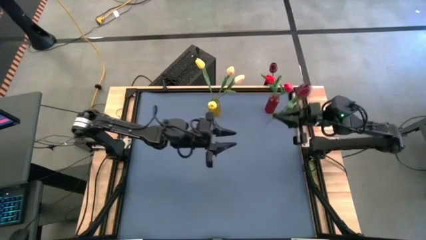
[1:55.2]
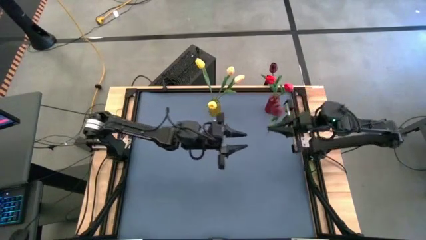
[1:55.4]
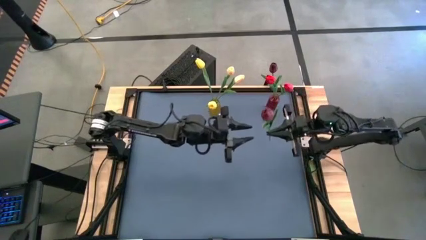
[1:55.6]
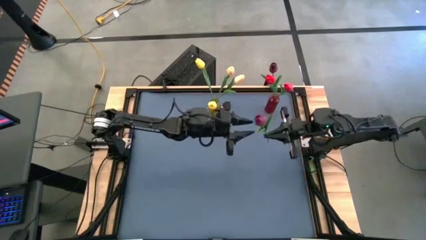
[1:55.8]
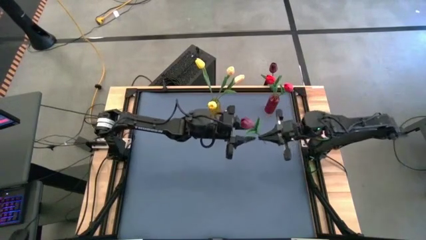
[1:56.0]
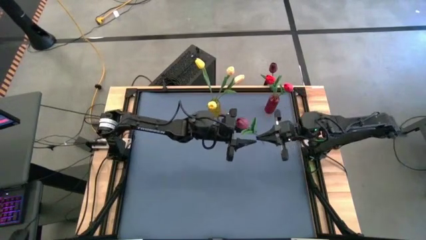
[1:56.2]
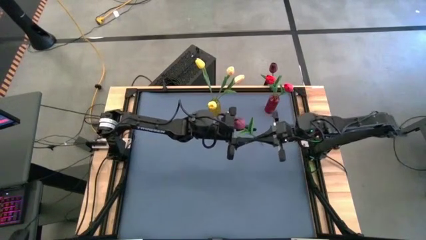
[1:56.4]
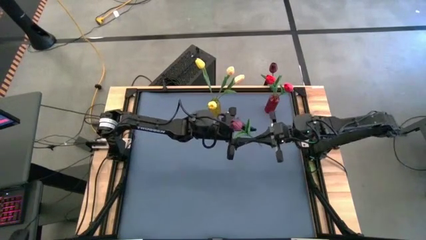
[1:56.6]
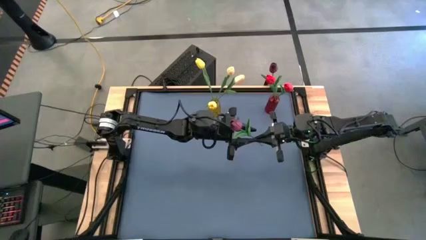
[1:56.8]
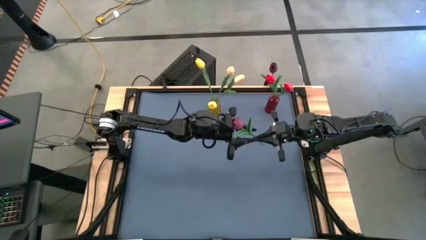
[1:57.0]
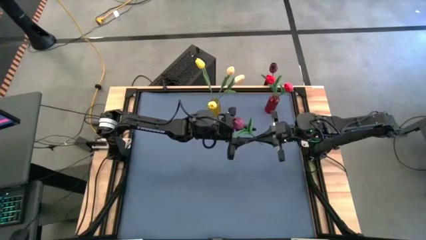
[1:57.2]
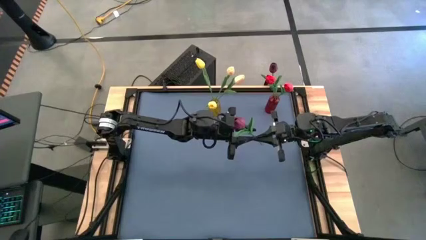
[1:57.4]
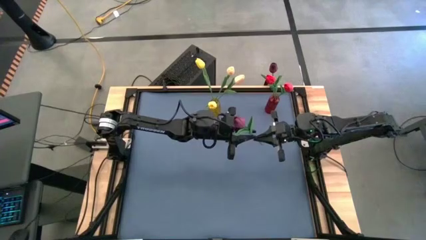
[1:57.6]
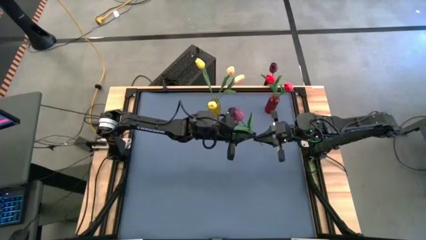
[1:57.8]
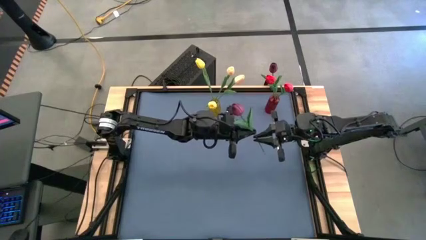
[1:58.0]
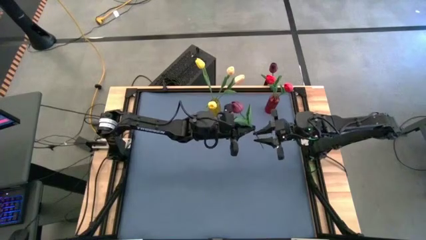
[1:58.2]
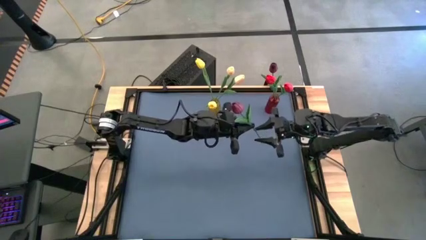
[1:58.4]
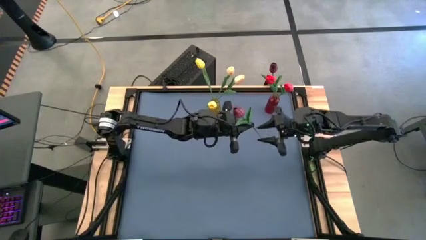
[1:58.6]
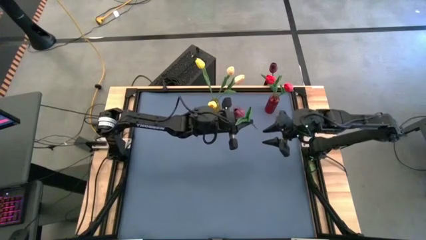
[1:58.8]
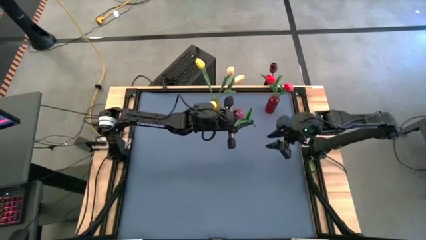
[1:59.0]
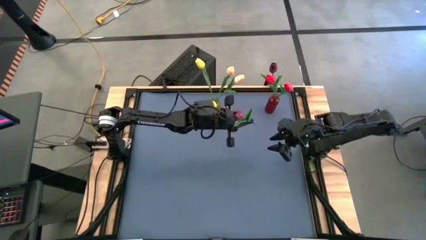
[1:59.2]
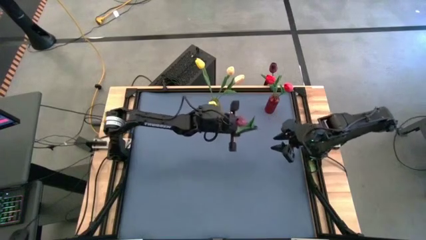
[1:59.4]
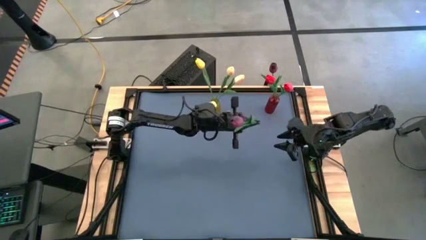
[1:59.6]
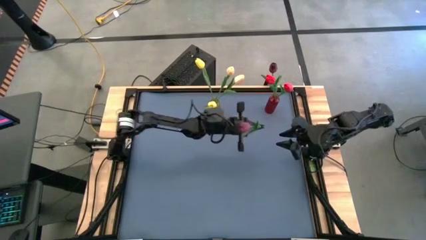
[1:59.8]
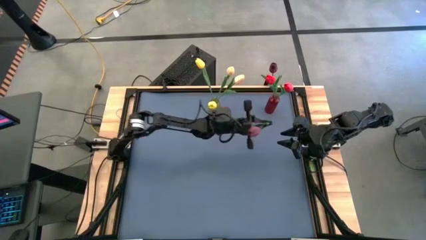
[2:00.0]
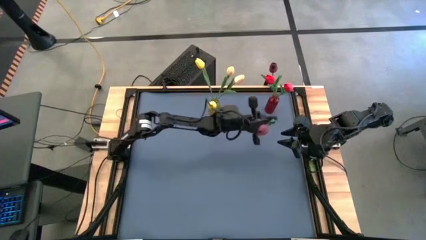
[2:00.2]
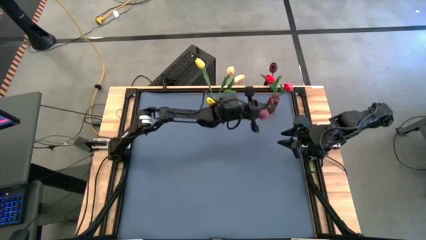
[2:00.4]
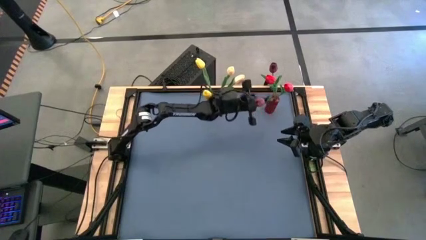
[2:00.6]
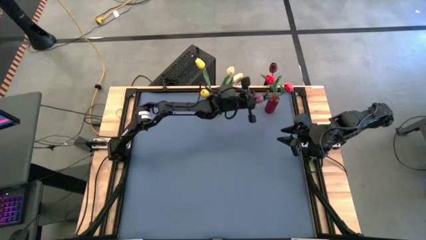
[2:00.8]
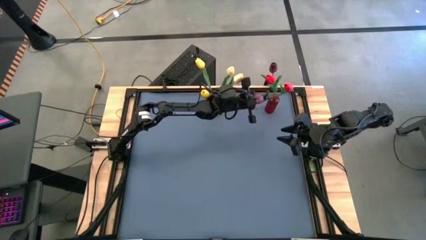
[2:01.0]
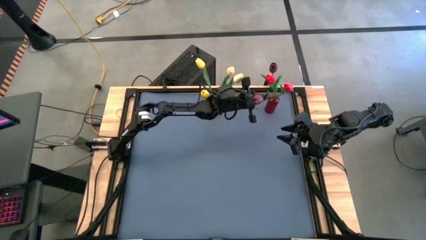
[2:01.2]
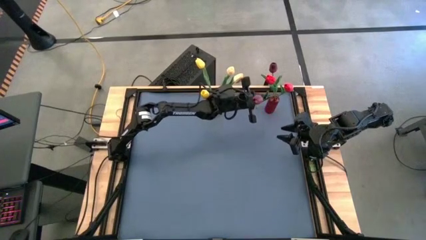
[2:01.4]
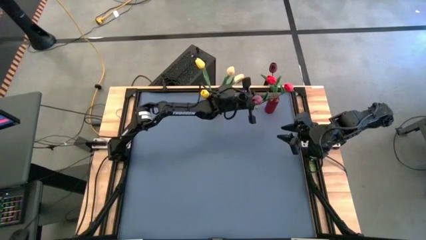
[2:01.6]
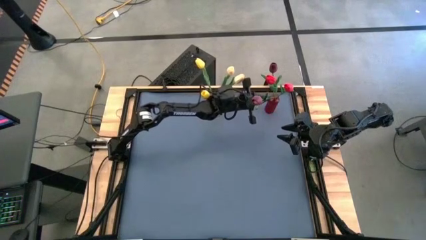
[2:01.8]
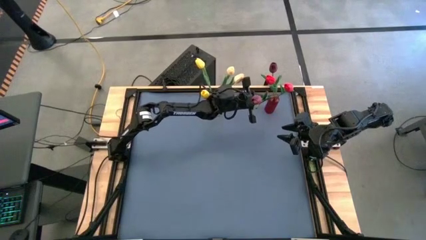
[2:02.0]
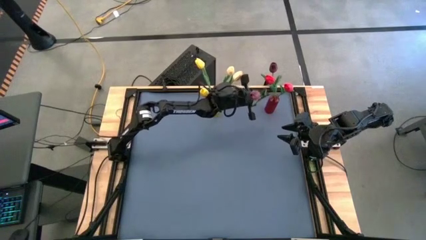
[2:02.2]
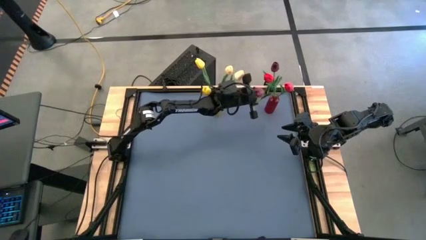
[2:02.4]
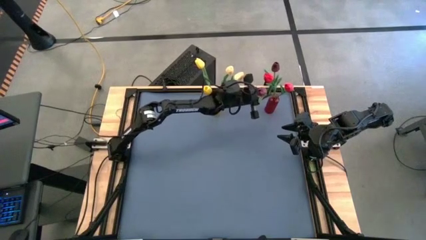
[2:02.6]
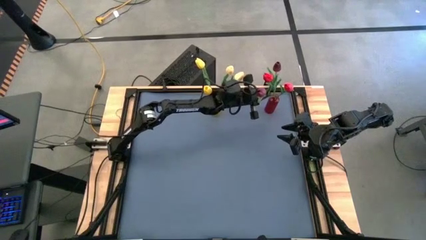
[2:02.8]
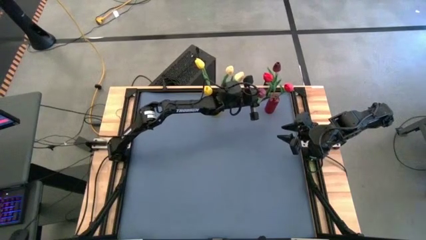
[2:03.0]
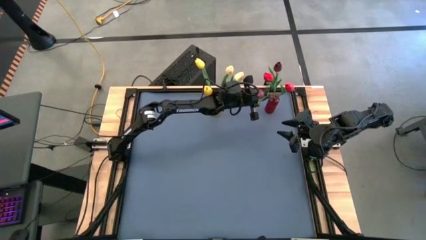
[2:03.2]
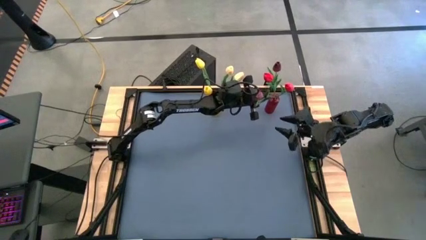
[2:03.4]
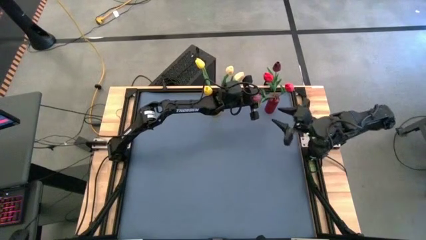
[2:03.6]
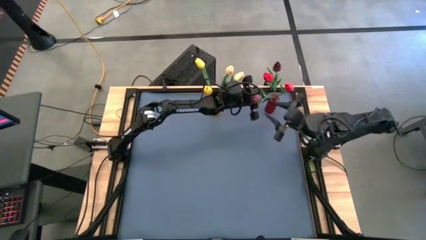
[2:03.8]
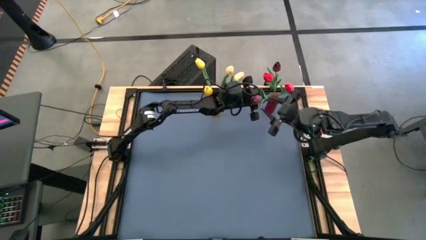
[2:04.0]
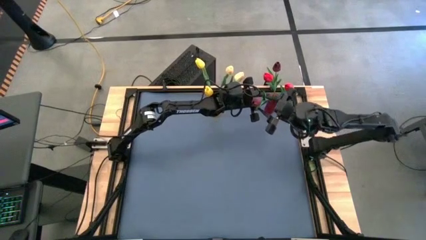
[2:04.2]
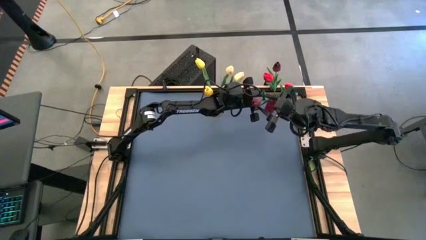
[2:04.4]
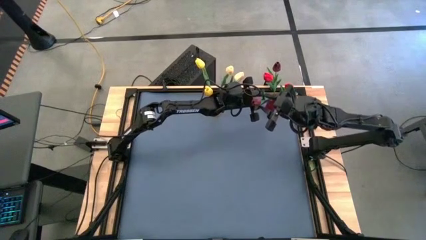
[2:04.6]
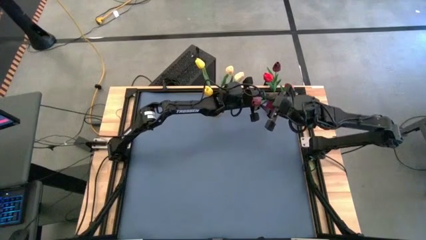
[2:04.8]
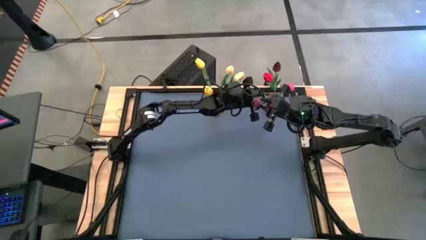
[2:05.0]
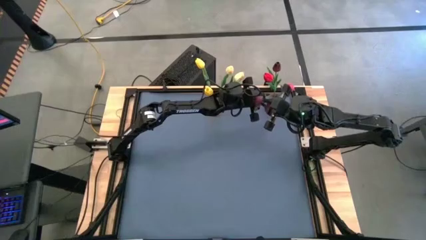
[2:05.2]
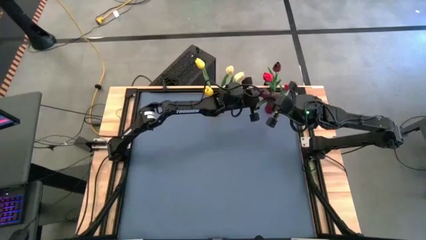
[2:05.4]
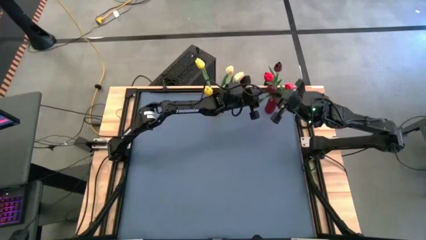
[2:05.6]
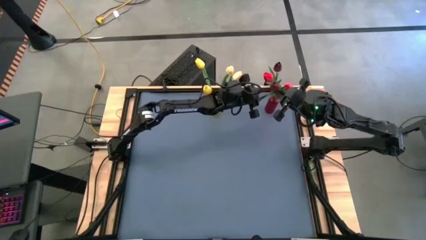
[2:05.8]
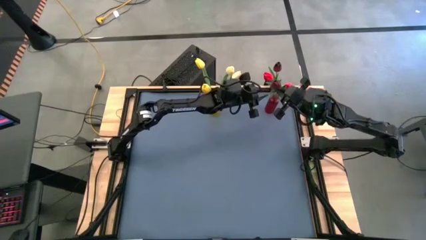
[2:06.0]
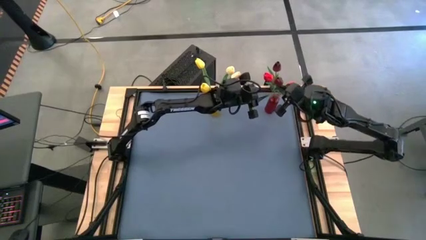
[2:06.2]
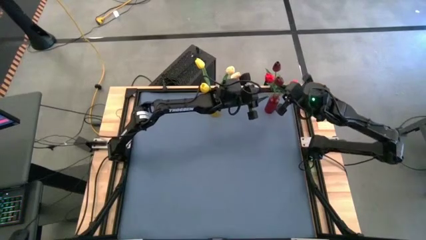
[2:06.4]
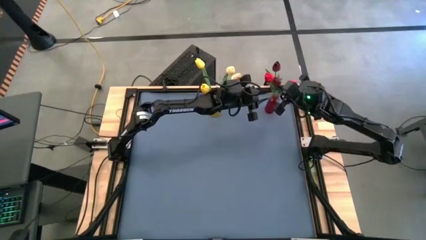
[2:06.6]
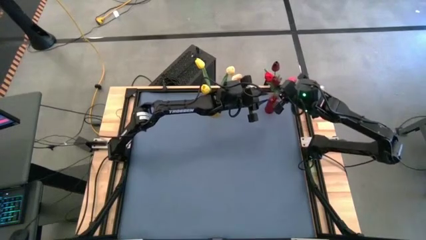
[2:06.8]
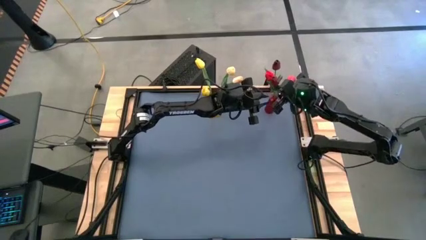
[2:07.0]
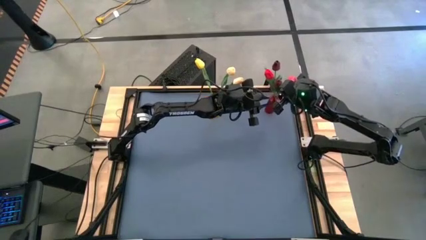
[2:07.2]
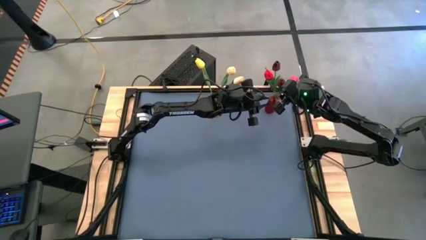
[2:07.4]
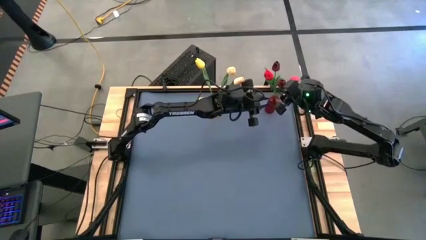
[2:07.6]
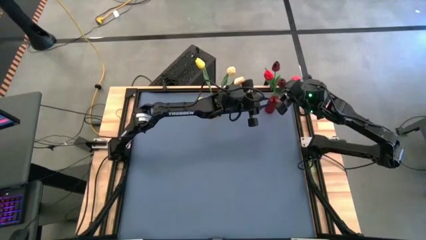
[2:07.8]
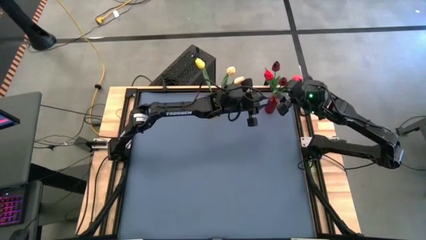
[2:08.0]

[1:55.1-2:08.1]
Task: Sort flowers into vase by color
Put the dark red flower into the red vase

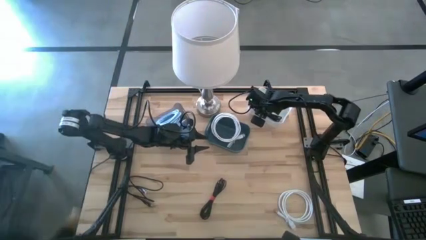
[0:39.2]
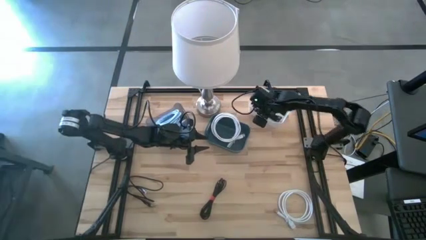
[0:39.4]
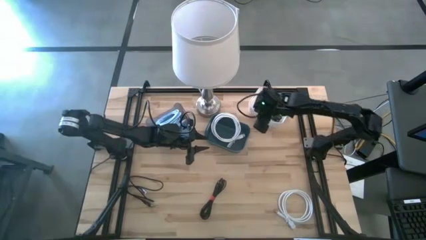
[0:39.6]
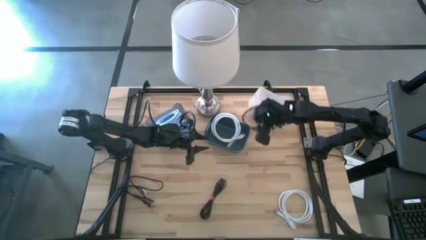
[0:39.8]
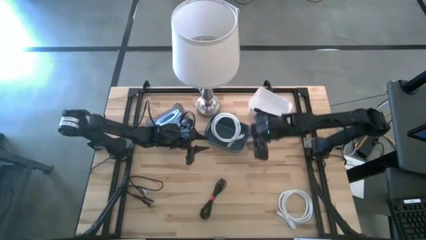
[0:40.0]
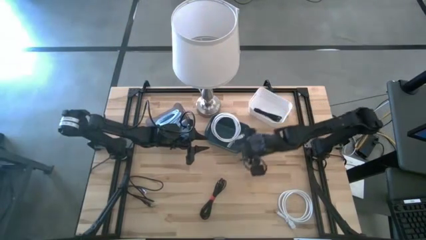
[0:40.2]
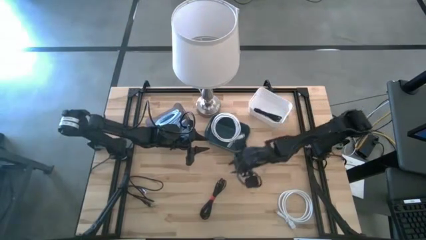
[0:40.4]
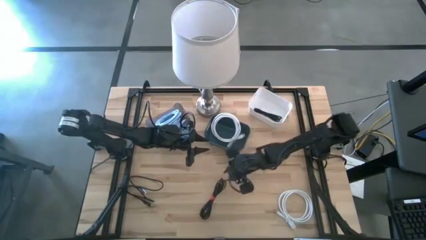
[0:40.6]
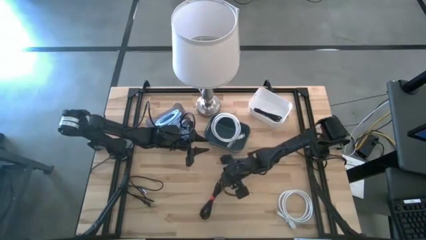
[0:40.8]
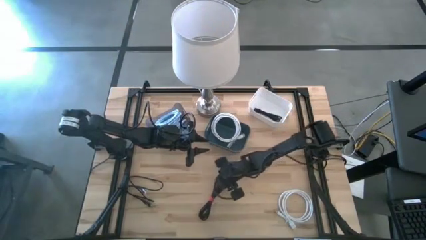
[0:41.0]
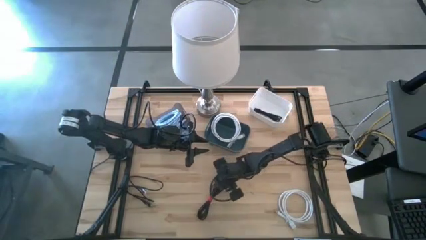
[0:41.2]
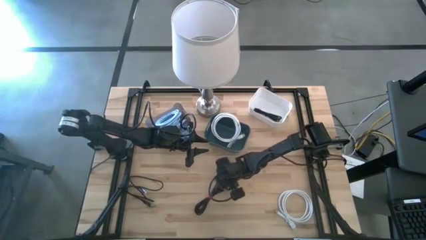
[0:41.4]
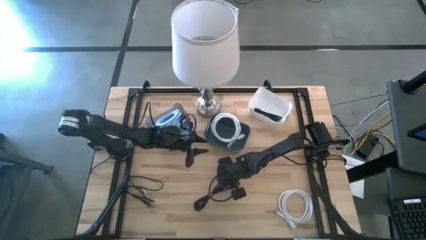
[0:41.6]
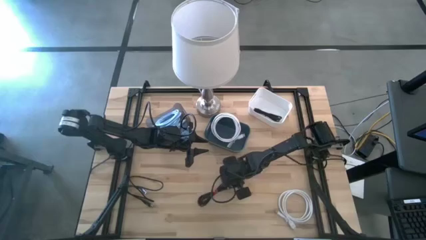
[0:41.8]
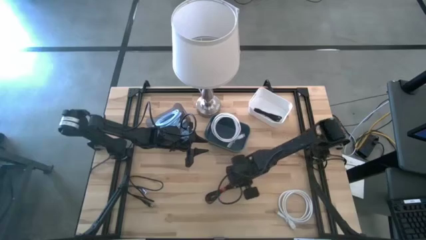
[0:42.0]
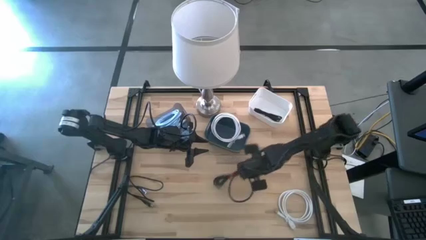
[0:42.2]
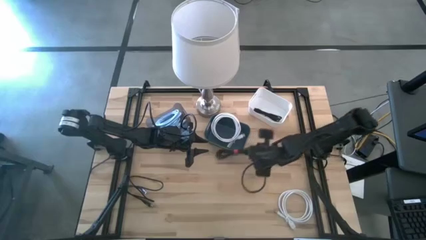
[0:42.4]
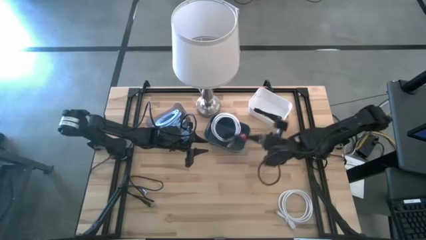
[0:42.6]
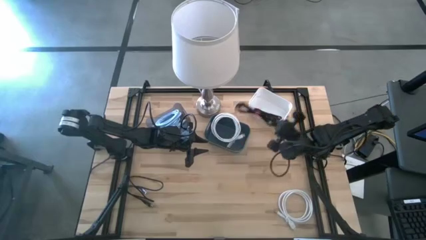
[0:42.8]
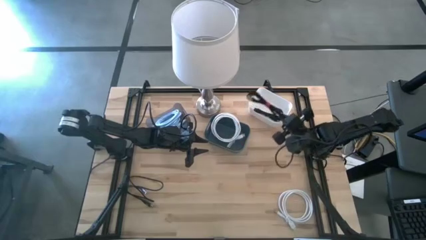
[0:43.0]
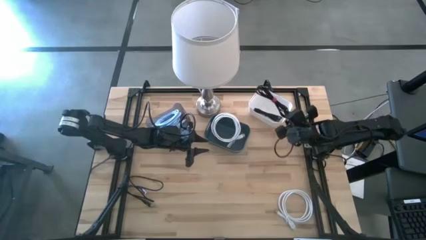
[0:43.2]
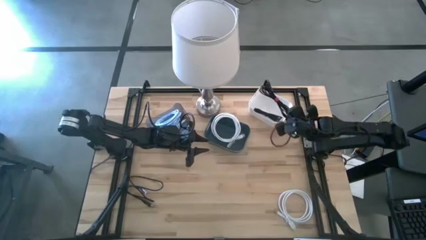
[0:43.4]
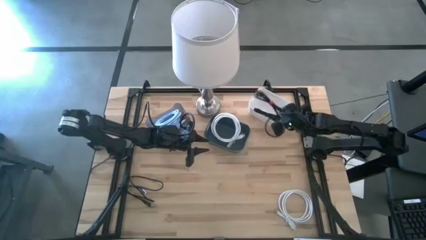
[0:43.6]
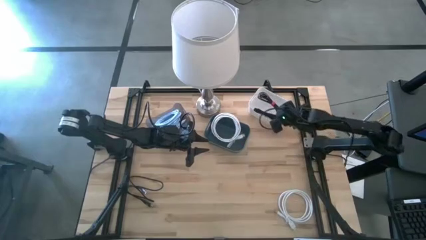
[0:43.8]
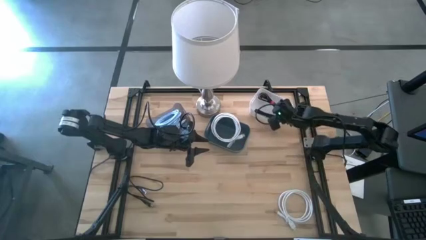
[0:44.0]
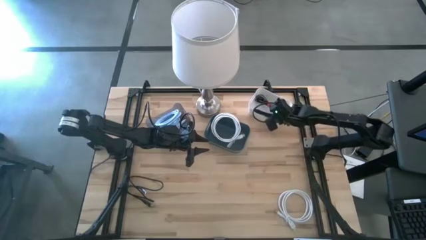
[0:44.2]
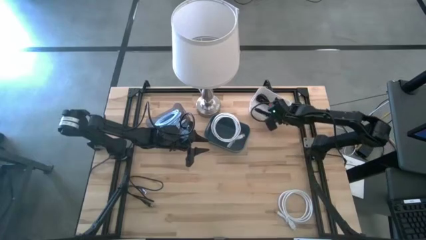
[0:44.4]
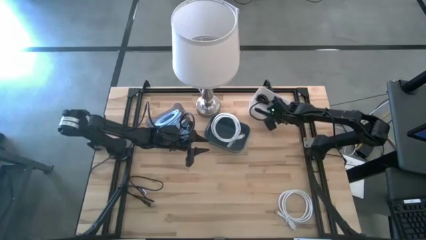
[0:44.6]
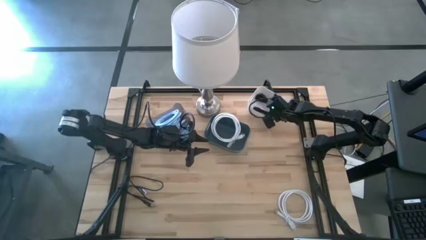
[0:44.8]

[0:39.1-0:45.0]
Task: Pick & Place USB Port
Put the right black charger cable into the white bin
